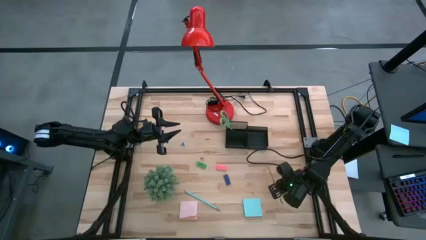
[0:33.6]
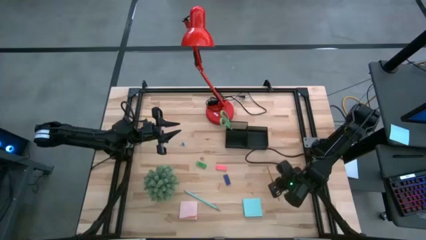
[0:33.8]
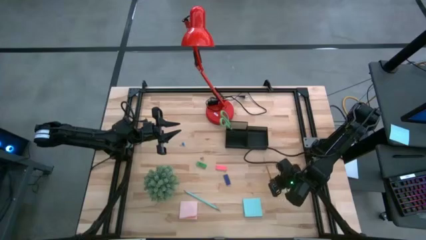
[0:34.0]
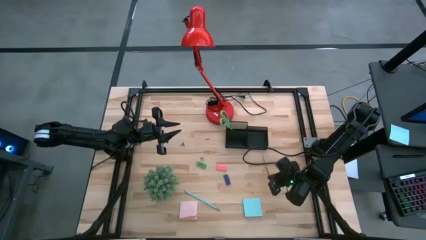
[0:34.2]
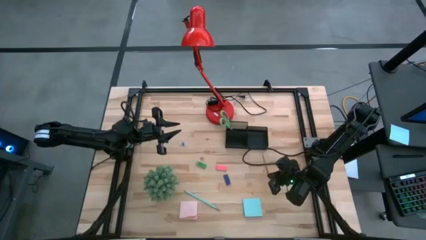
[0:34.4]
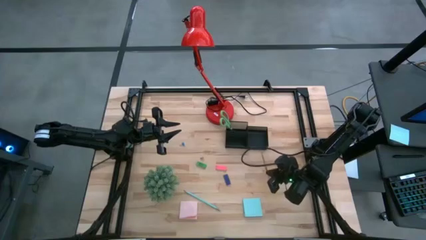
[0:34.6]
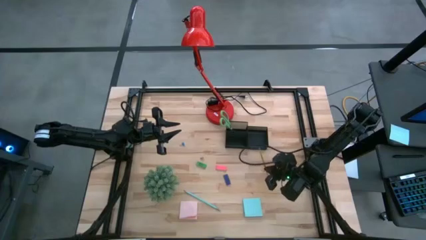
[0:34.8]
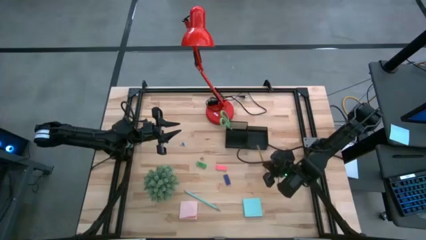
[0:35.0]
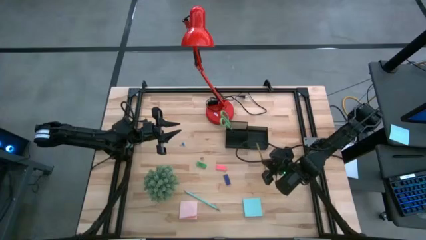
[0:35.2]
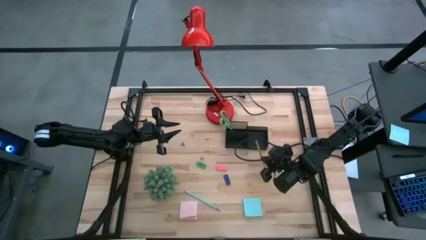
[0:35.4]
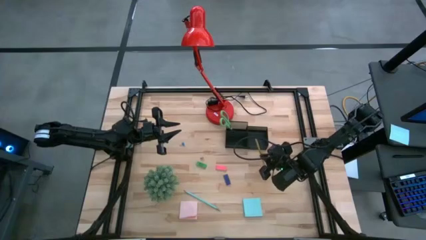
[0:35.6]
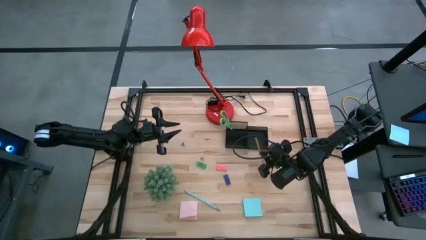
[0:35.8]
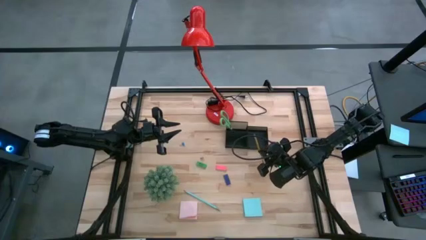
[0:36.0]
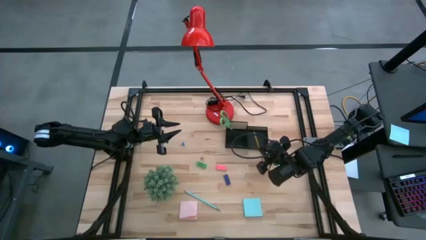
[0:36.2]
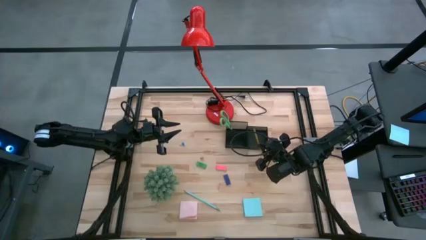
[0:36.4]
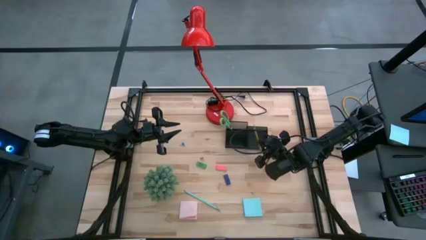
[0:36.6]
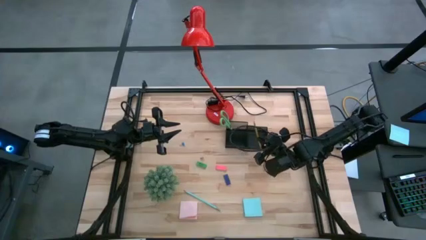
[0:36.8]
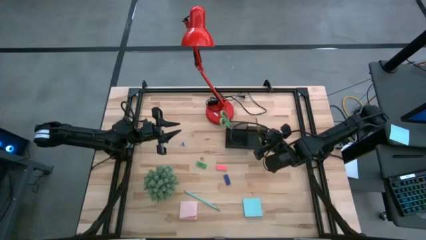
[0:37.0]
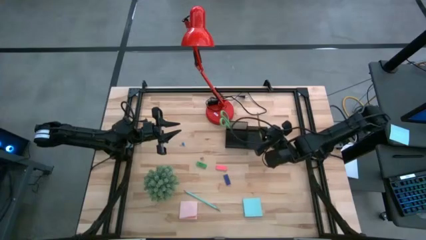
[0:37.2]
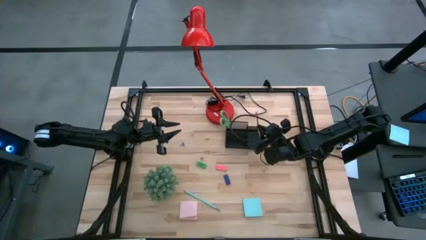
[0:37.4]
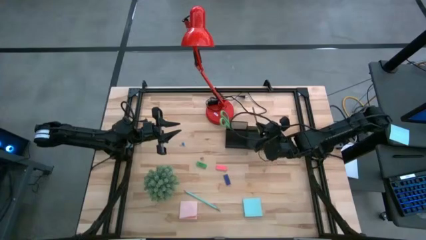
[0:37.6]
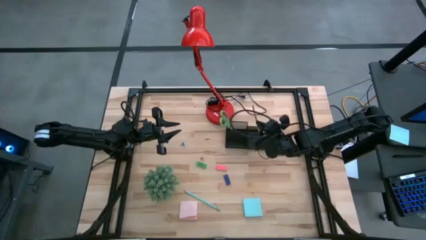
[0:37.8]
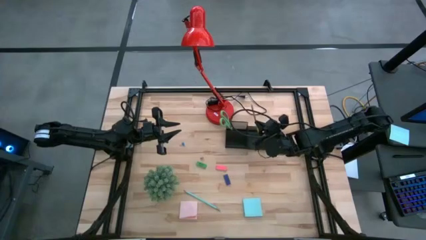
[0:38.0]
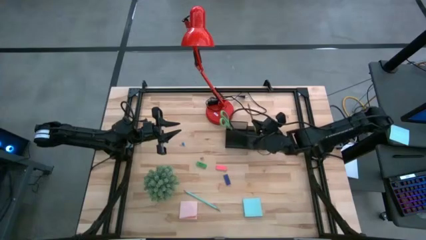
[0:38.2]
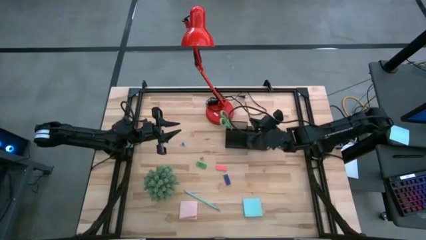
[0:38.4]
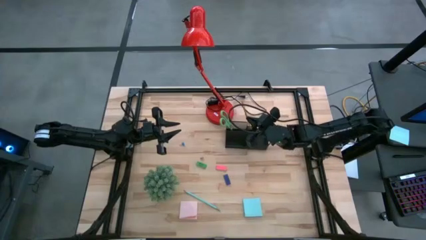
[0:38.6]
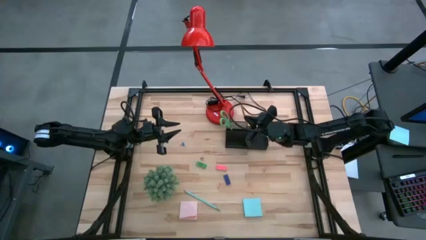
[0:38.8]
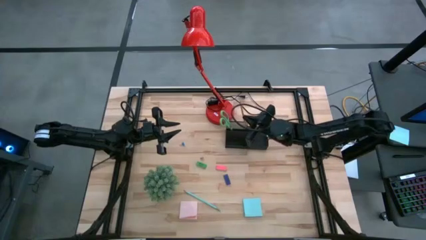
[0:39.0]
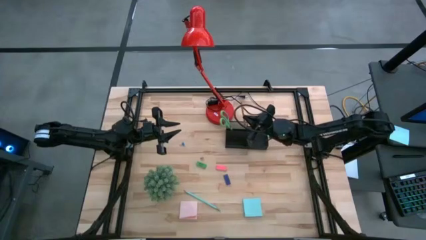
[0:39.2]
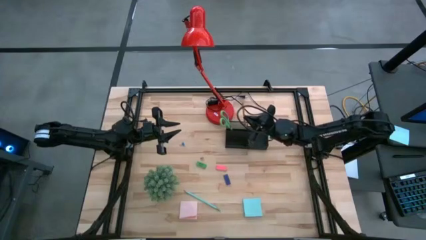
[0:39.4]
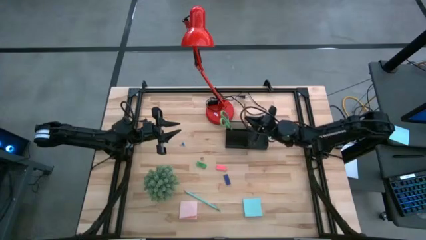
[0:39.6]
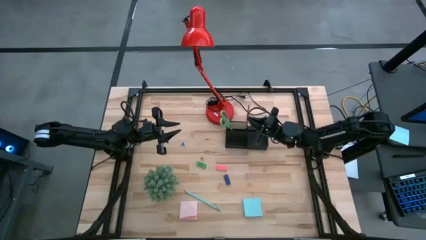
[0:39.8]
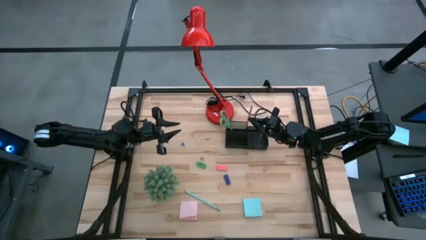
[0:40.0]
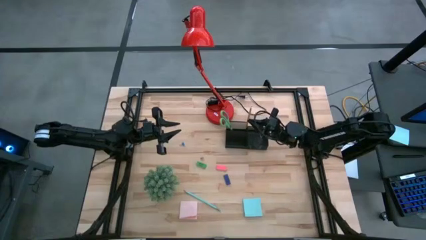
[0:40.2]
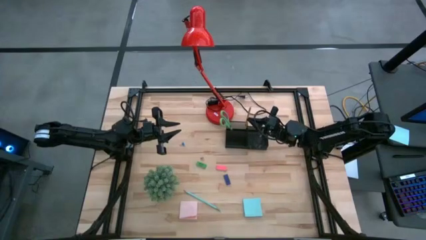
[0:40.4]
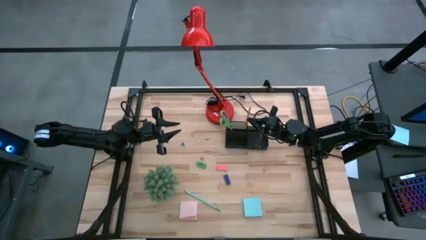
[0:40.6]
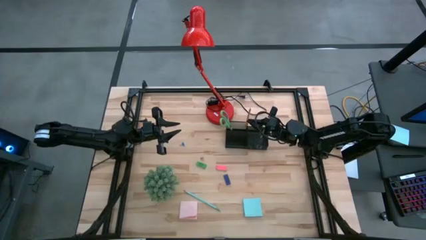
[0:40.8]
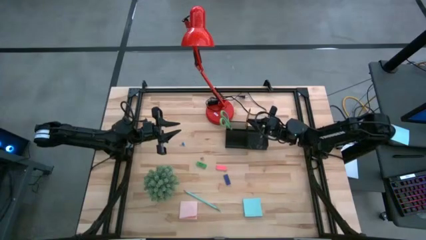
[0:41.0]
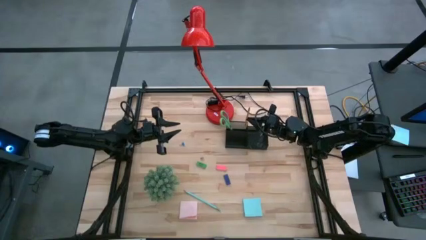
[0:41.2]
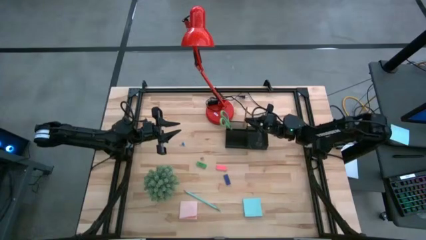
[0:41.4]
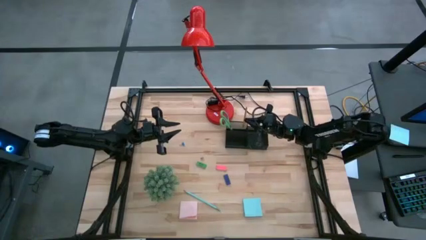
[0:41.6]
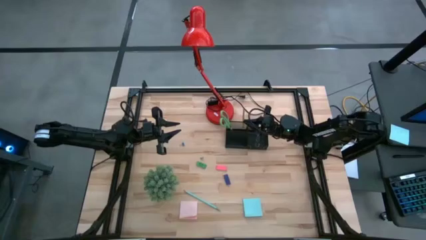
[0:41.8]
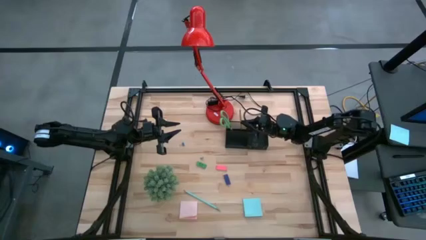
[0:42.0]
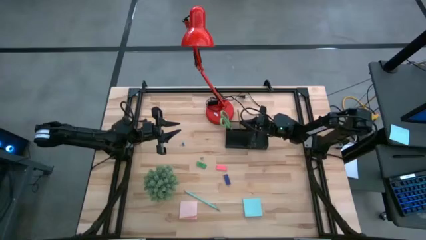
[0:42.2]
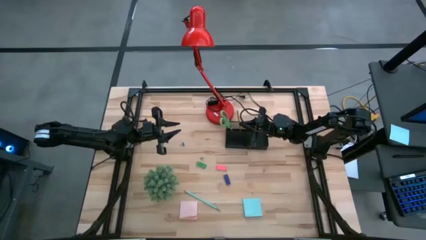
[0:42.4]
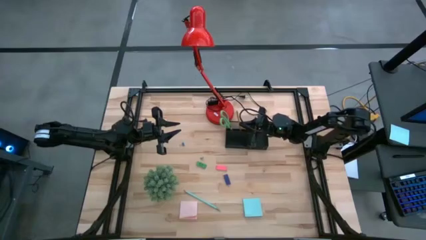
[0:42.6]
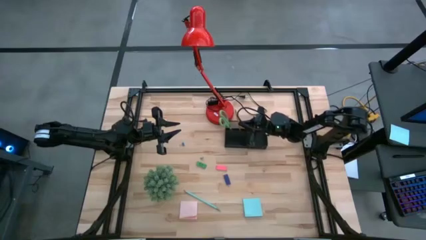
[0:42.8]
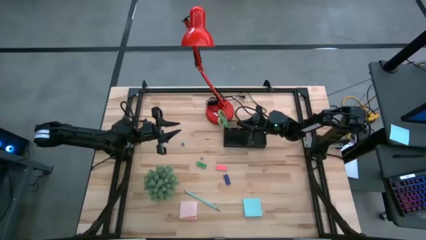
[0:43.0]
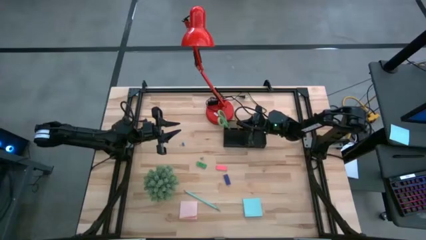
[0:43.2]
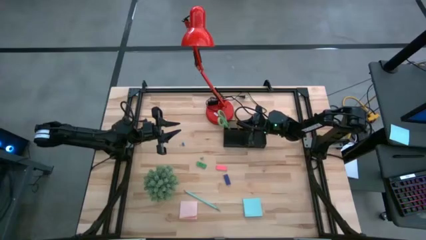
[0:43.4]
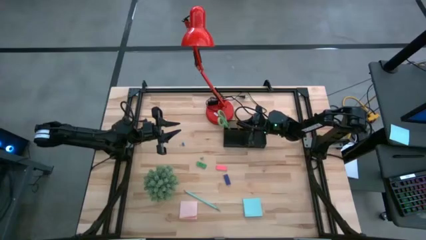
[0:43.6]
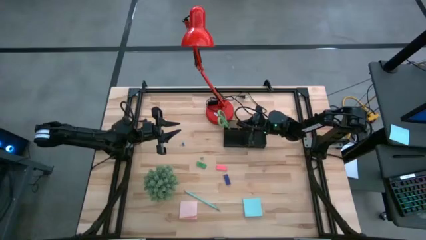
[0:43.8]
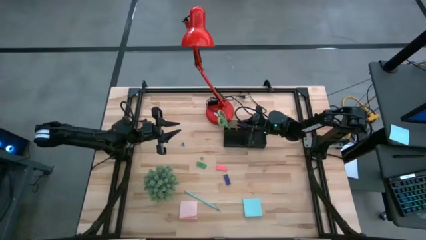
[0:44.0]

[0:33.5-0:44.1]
Task: Pick and place office supplies into organizer
Put the yellow pencil into the back left compartment of the desk organizer
